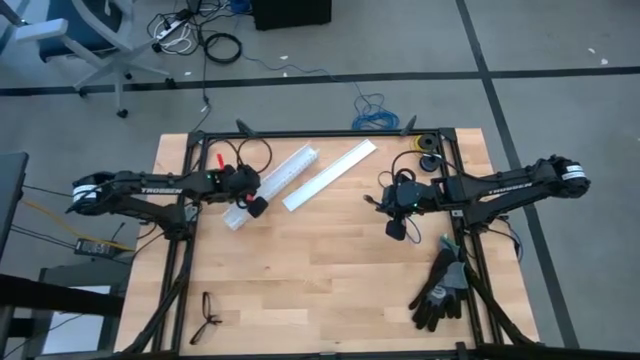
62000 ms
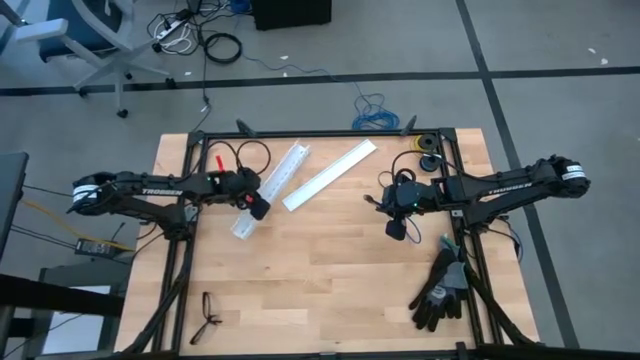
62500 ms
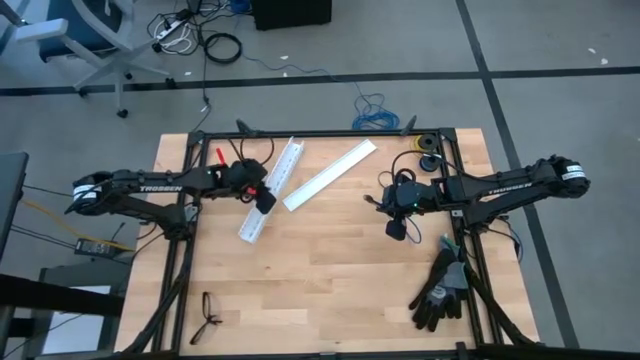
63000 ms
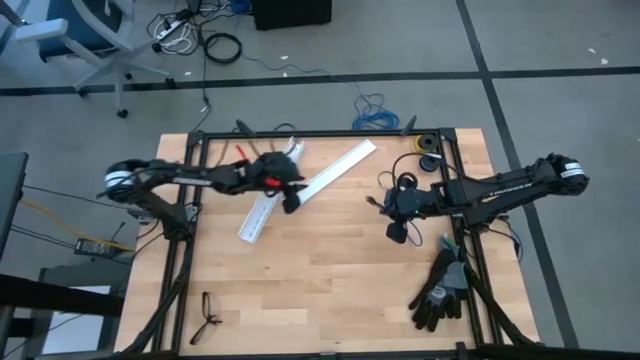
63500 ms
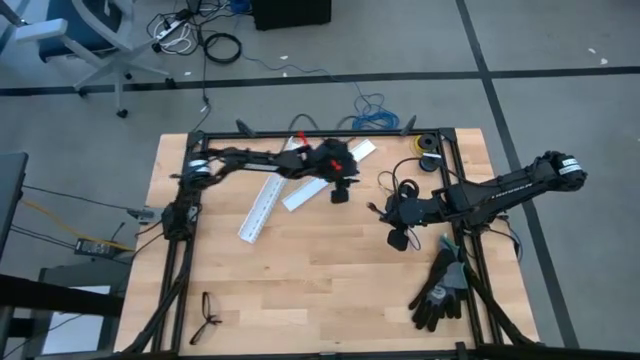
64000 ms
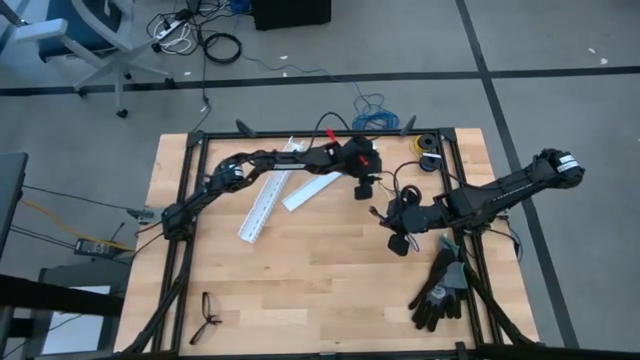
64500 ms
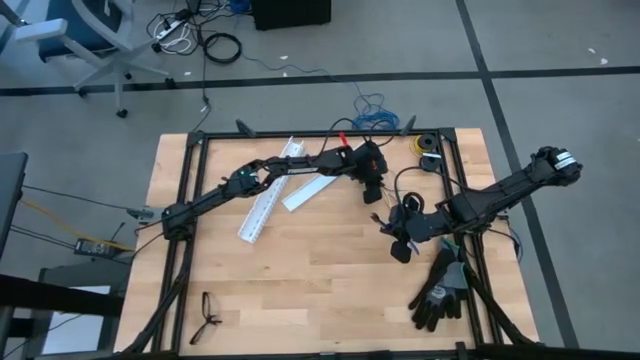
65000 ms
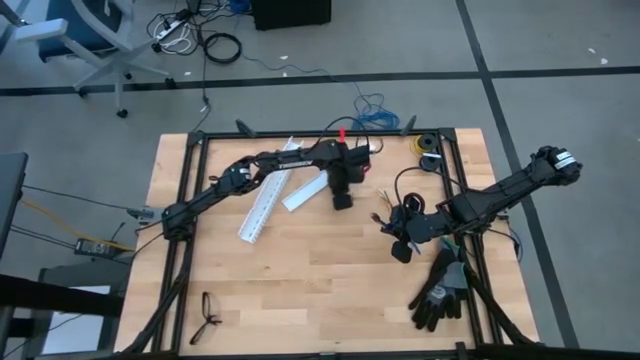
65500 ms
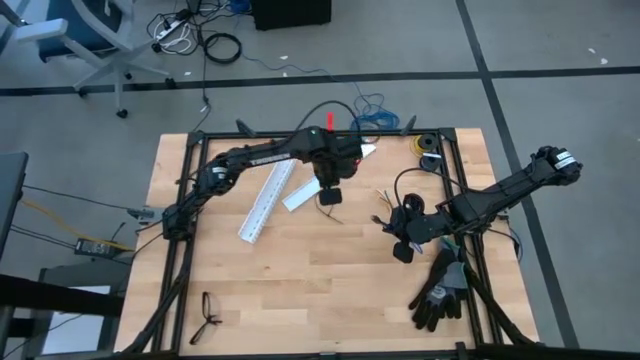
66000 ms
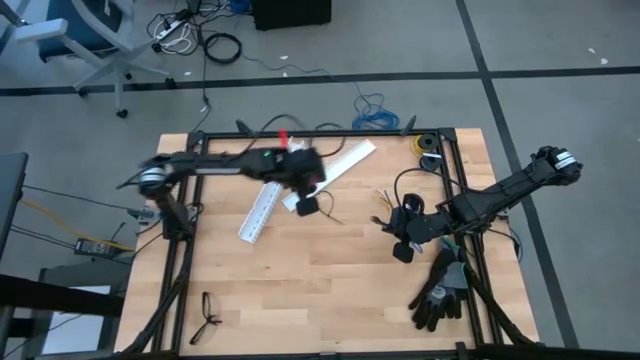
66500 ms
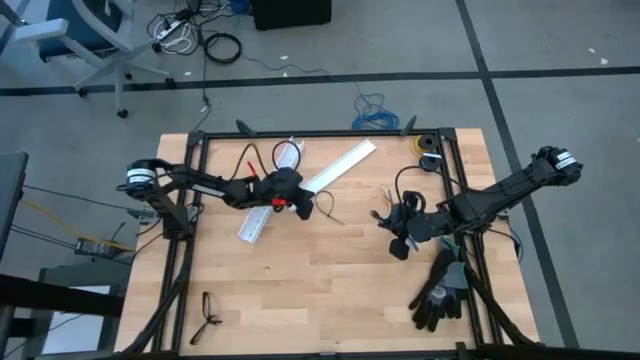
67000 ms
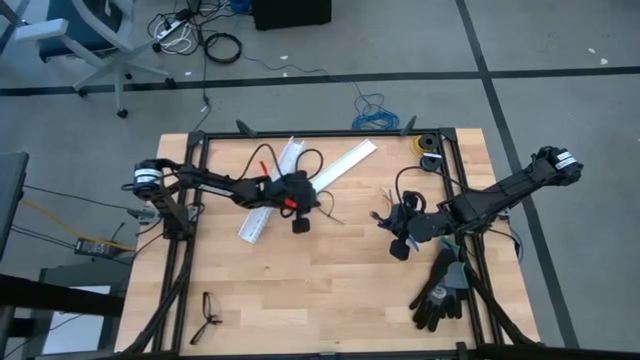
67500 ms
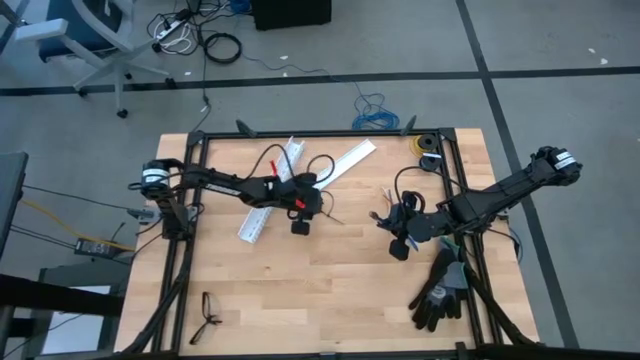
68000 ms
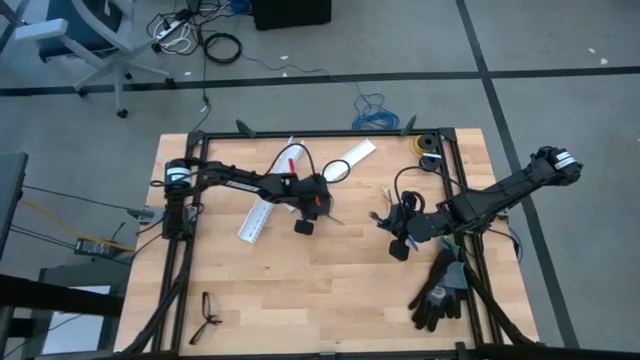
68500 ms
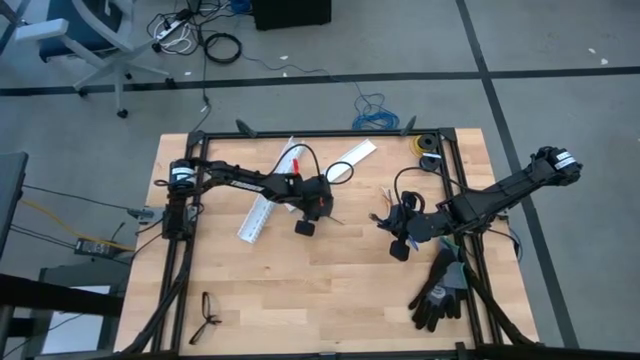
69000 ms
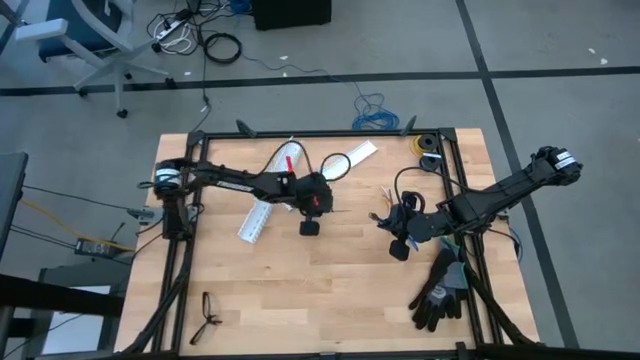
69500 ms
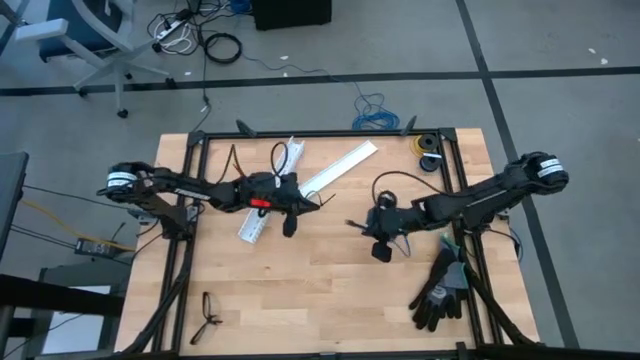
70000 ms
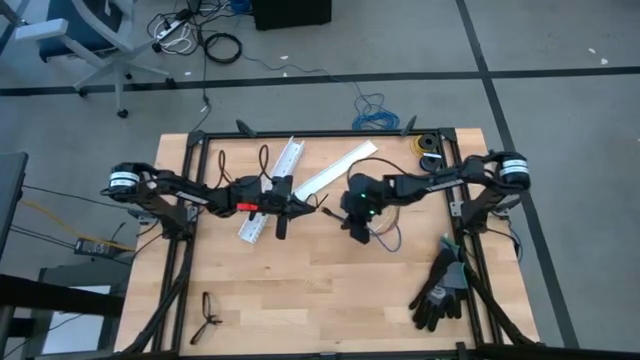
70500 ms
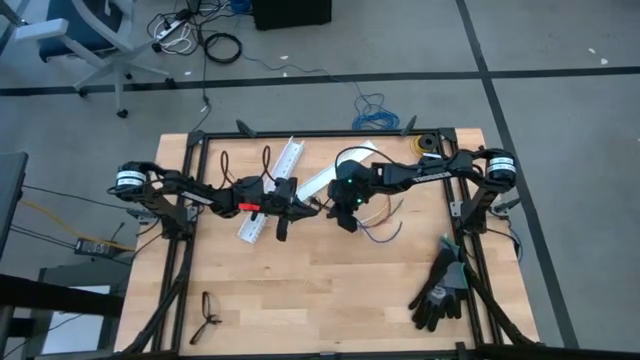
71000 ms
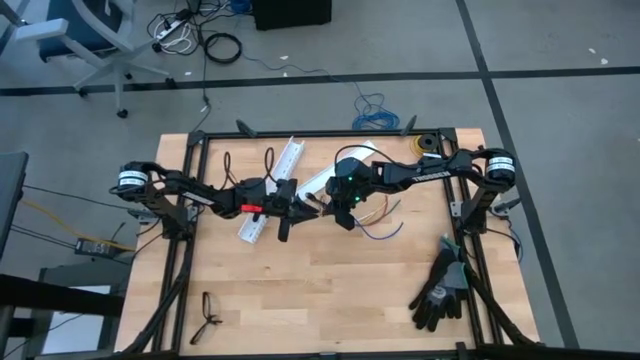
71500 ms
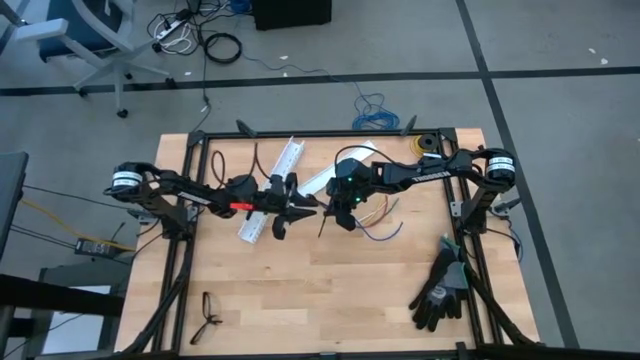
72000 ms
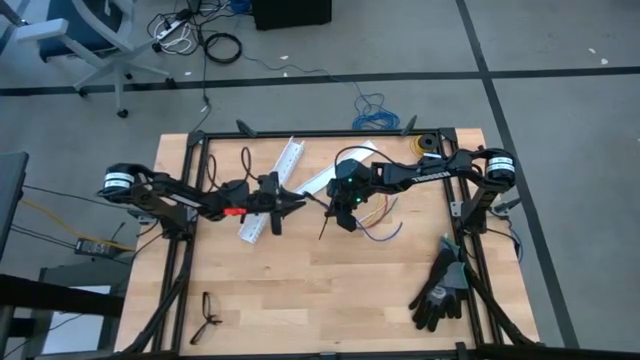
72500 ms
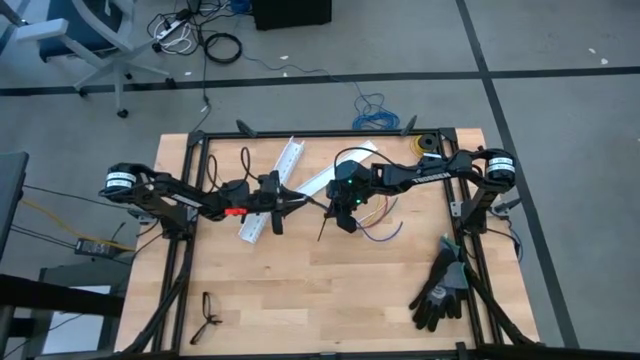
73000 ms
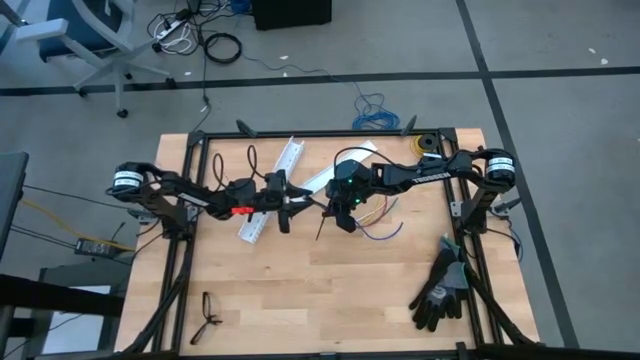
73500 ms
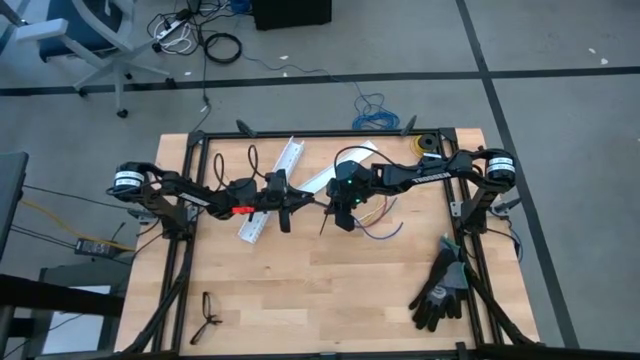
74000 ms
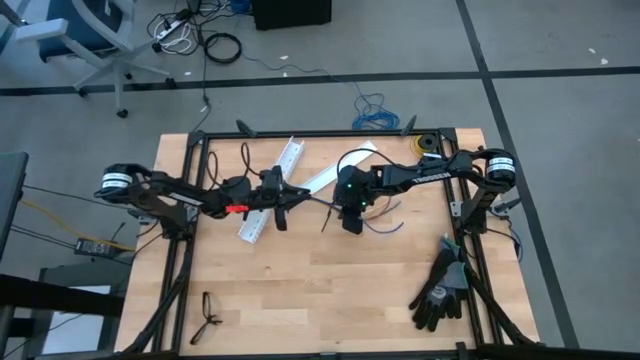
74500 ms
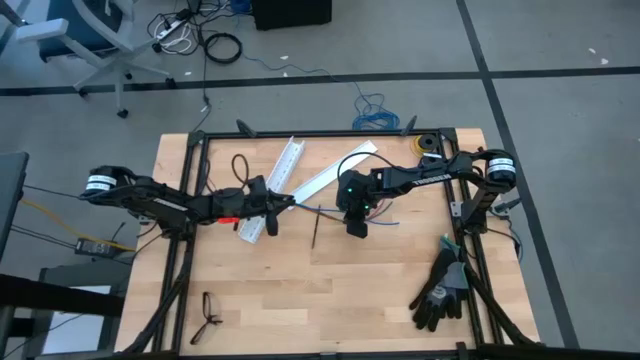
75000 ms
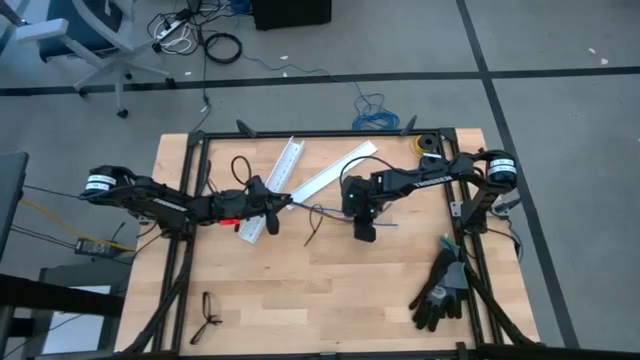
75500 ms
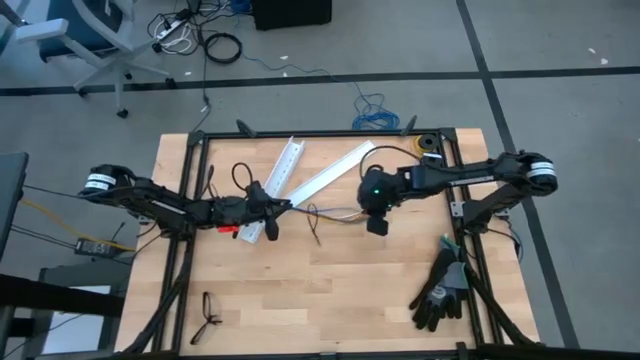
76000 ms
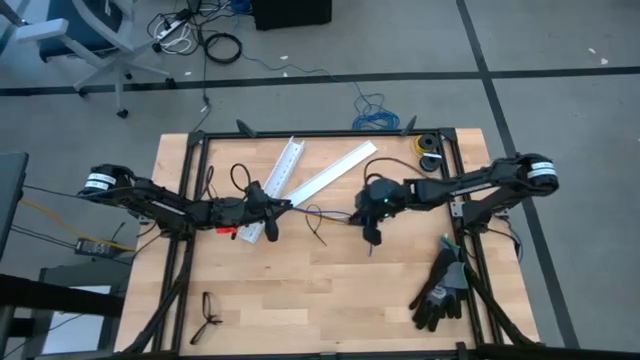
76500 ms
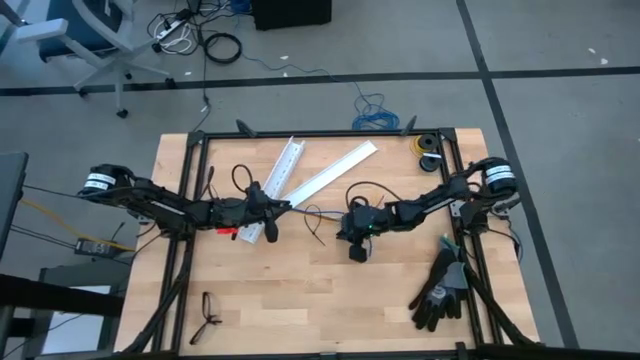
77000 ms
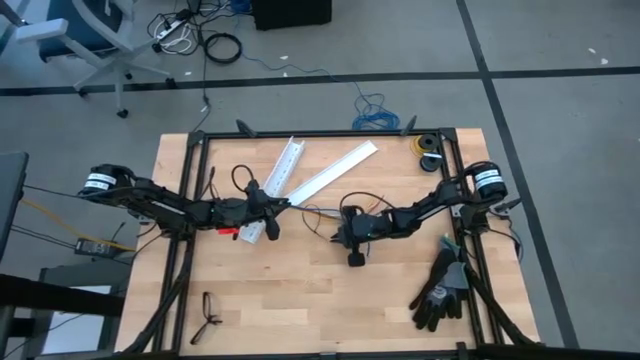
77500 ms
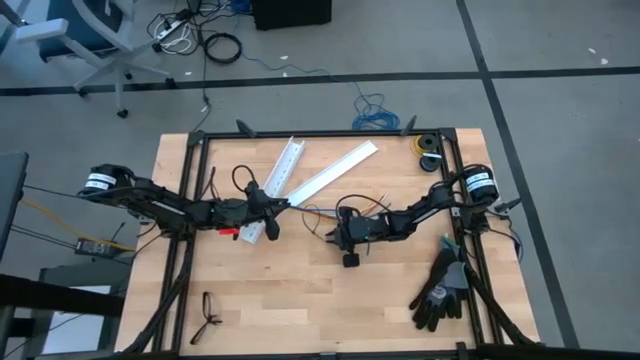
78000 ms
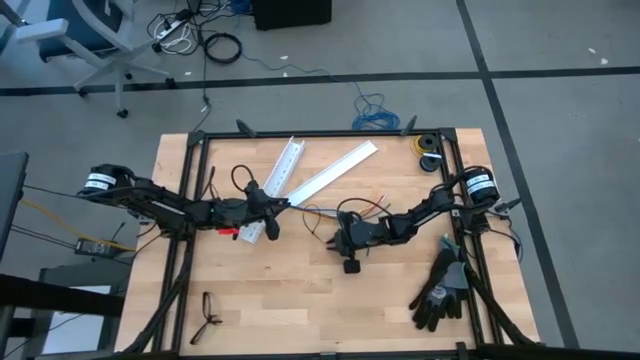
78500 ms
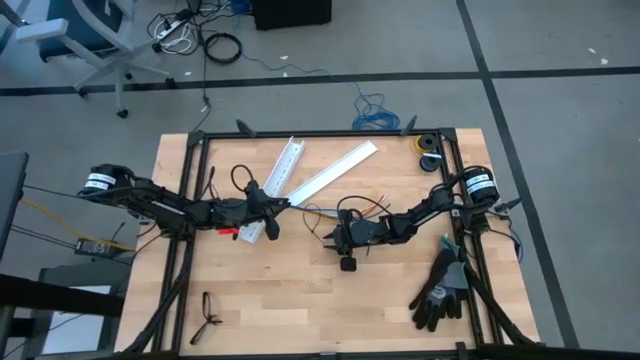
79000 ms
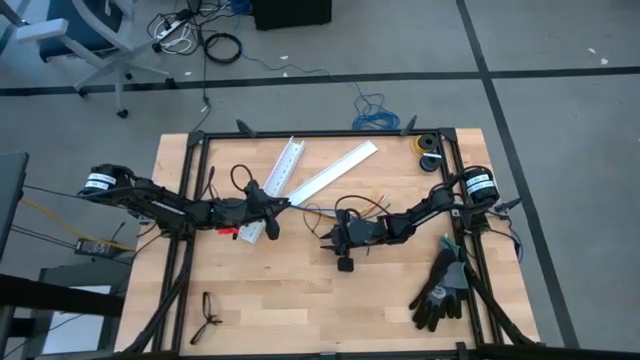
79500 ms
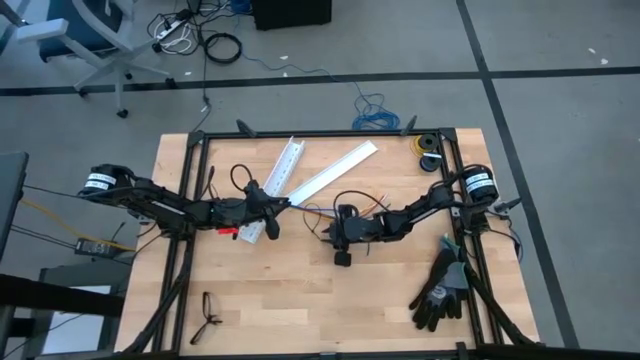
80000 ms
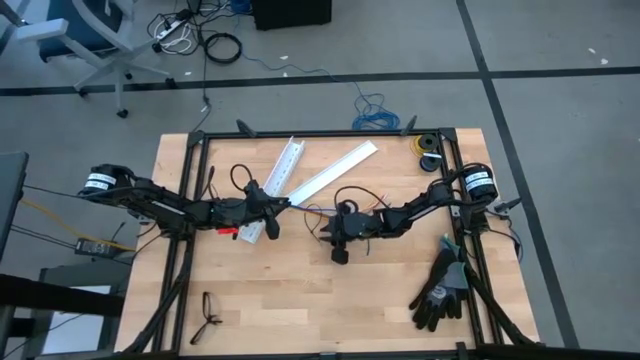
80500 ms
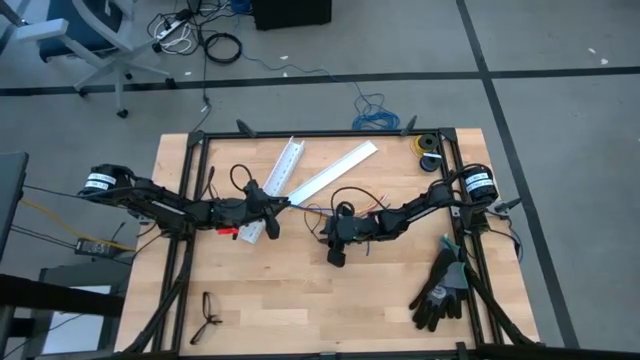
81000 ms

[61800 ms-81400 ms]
Task: Ziptie cables
Wrap the cable wires with the black zip tie

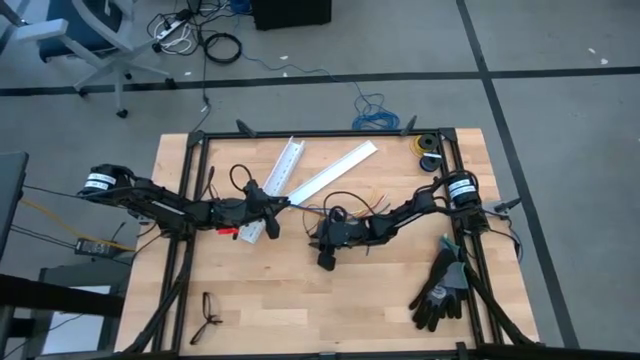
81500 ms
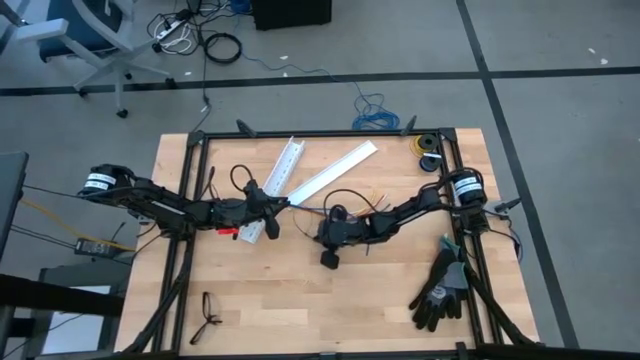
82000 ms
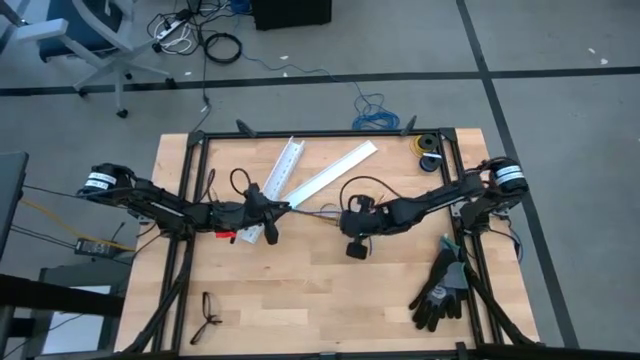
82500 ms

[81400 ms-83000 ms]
Wrap the cable wires with the black zip tie
